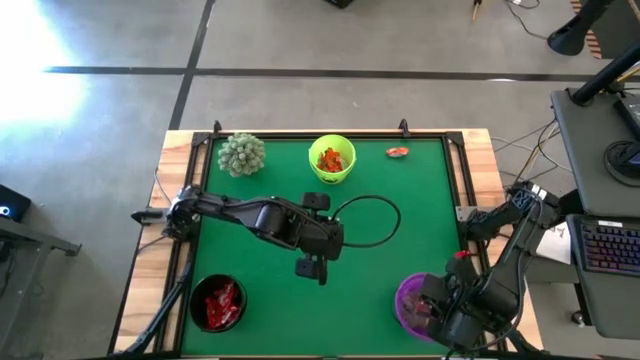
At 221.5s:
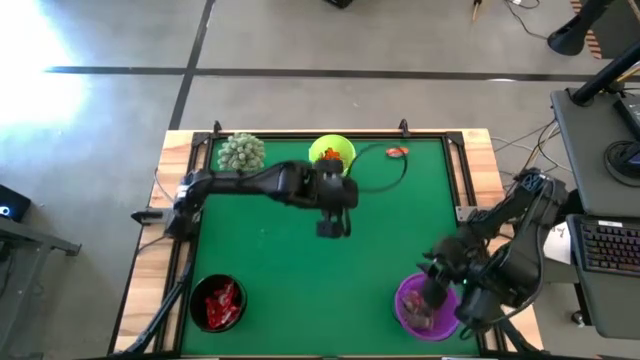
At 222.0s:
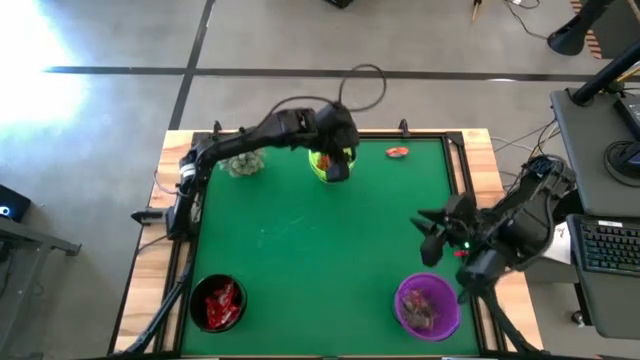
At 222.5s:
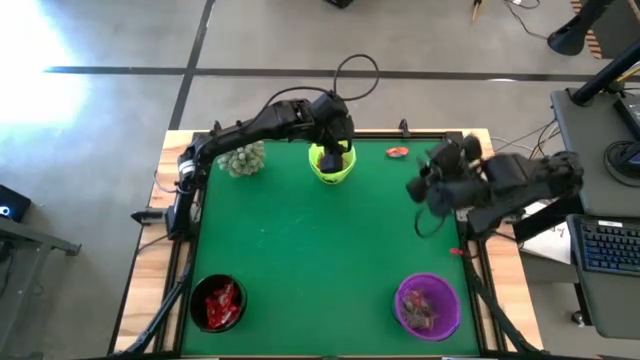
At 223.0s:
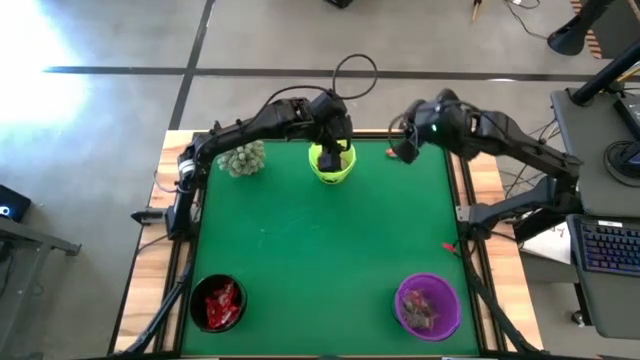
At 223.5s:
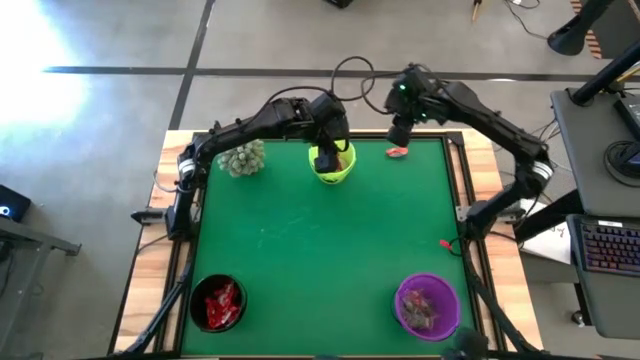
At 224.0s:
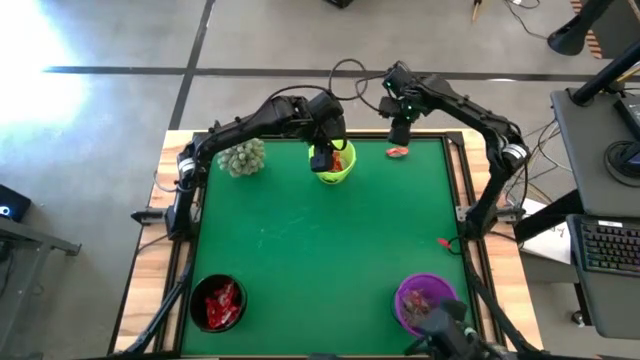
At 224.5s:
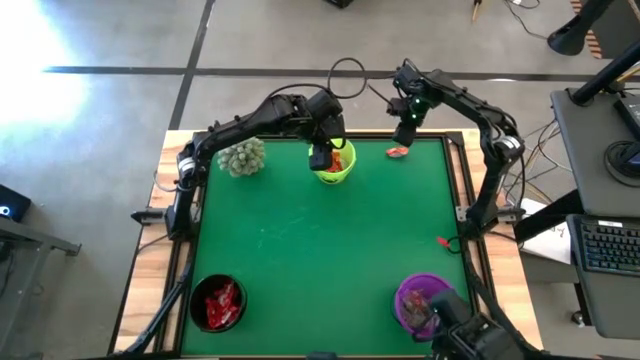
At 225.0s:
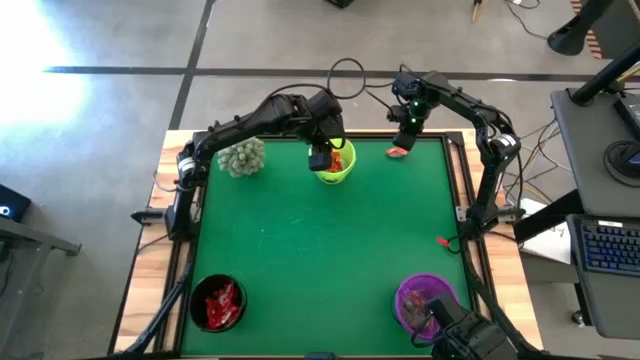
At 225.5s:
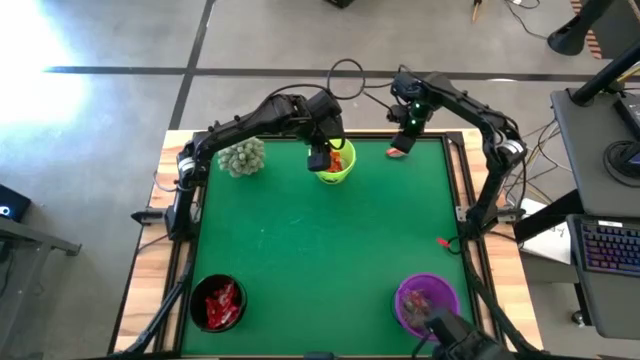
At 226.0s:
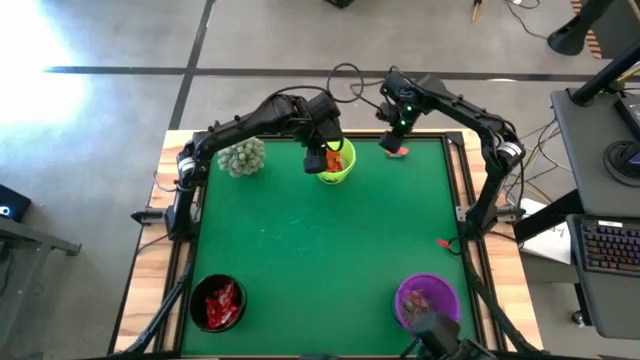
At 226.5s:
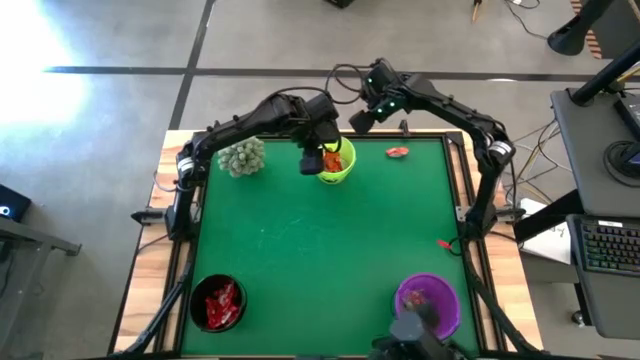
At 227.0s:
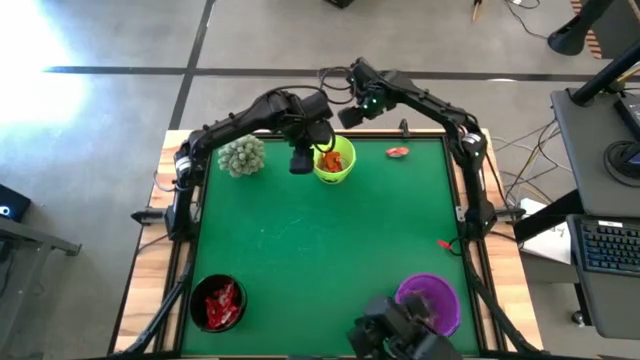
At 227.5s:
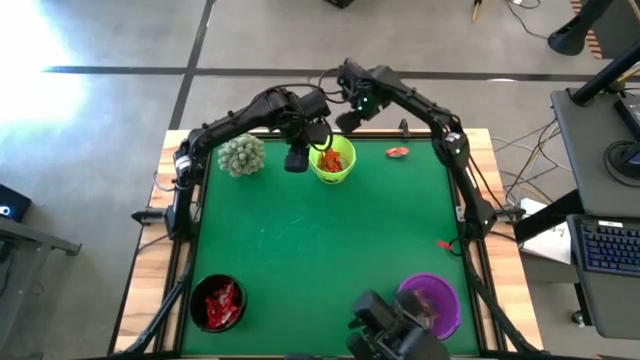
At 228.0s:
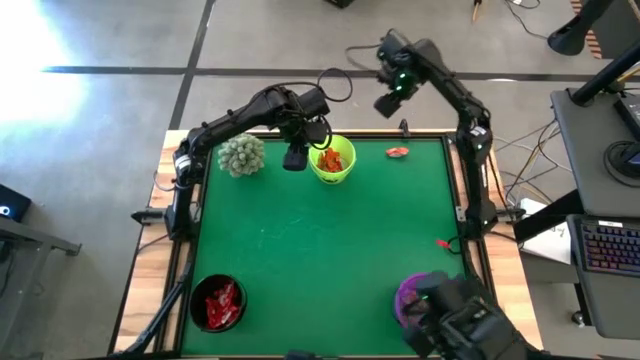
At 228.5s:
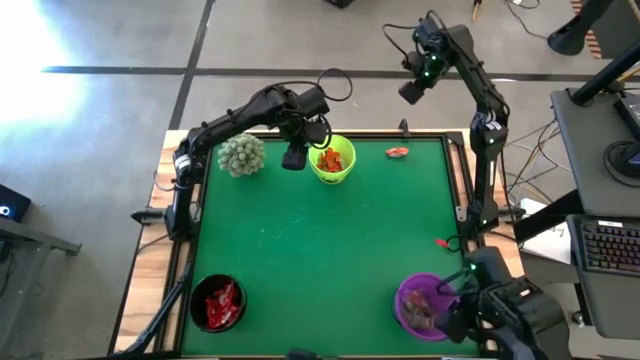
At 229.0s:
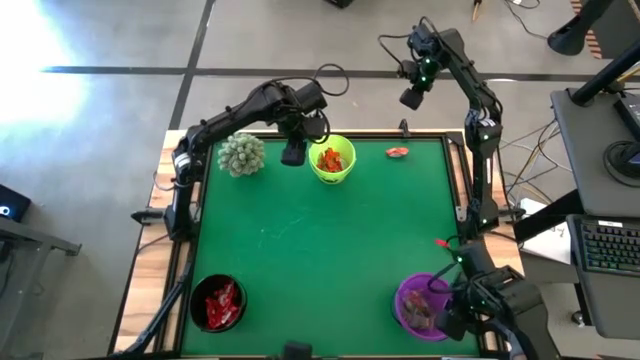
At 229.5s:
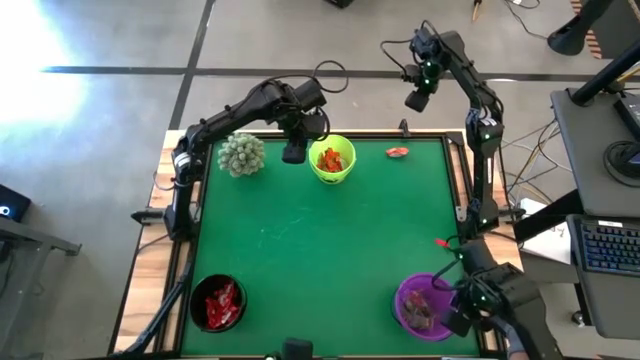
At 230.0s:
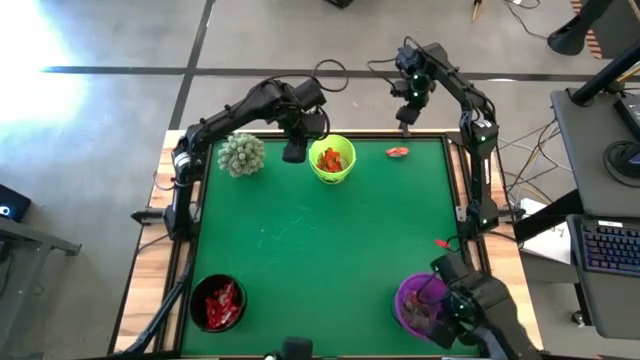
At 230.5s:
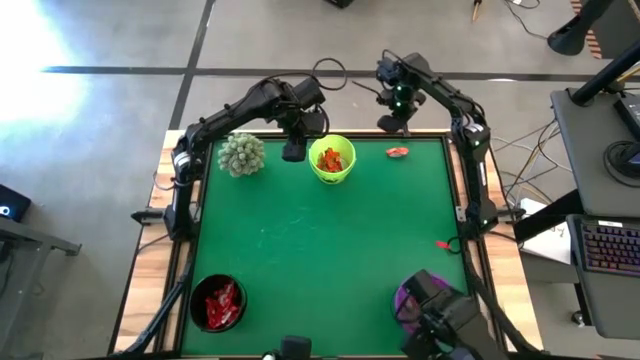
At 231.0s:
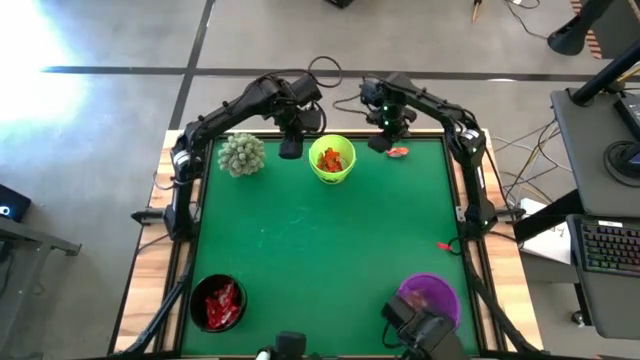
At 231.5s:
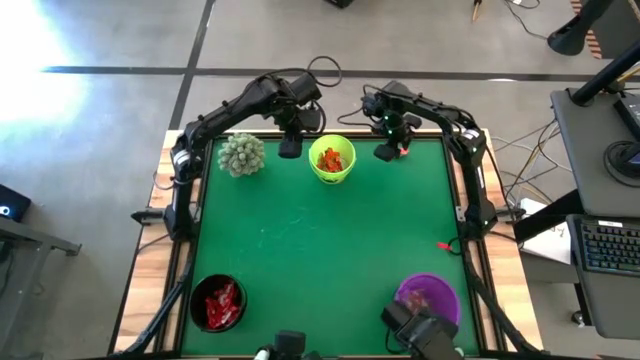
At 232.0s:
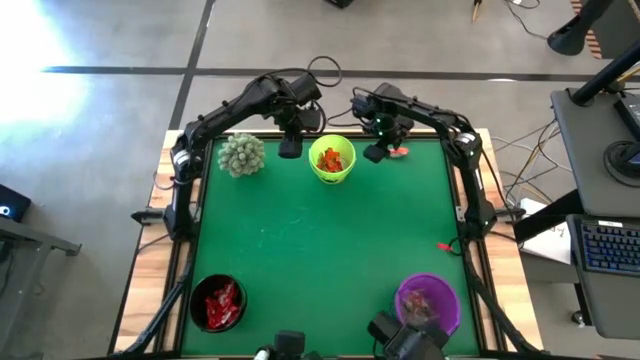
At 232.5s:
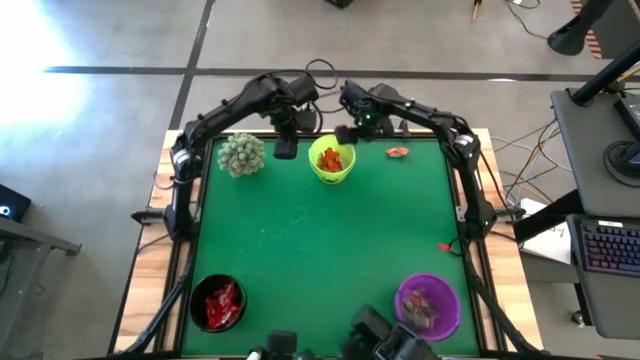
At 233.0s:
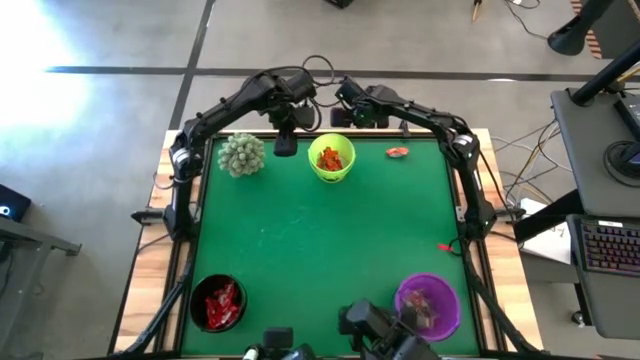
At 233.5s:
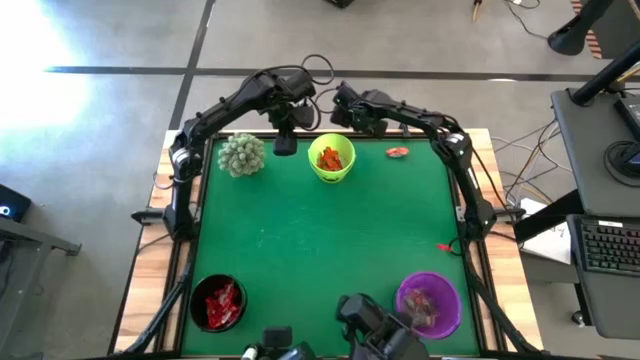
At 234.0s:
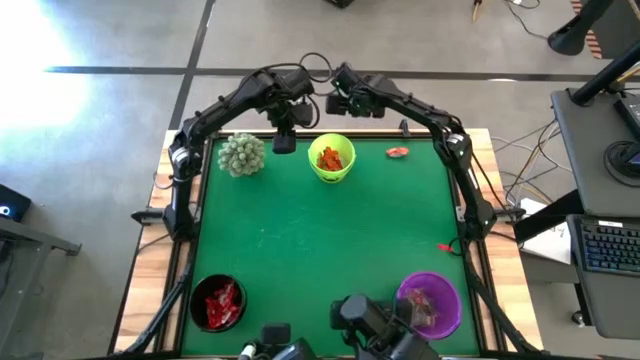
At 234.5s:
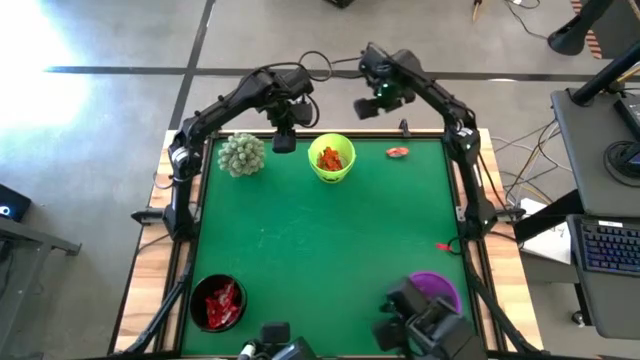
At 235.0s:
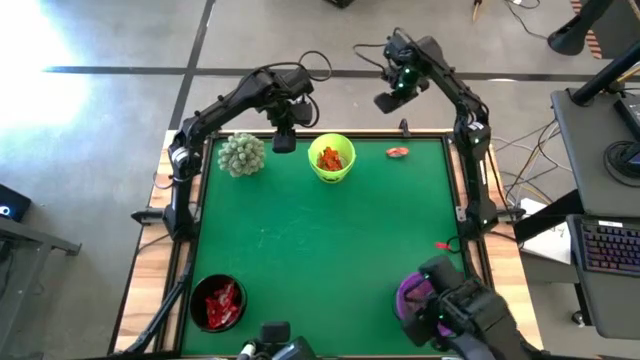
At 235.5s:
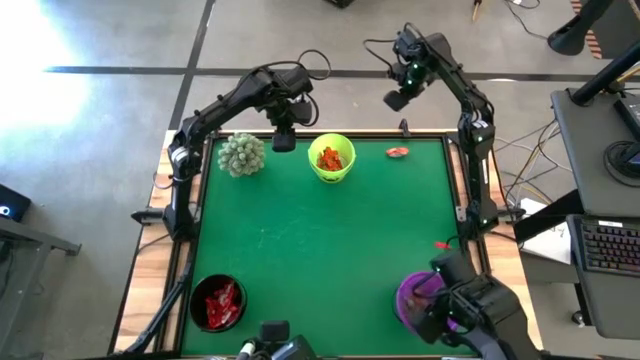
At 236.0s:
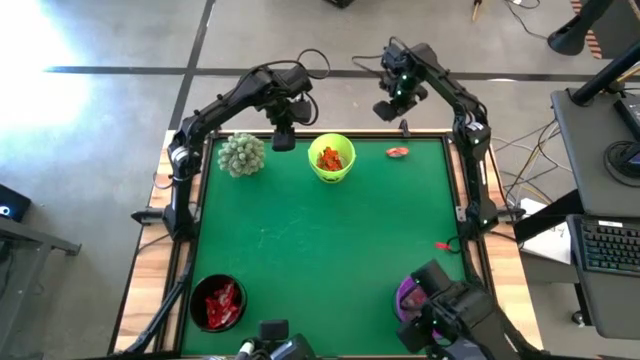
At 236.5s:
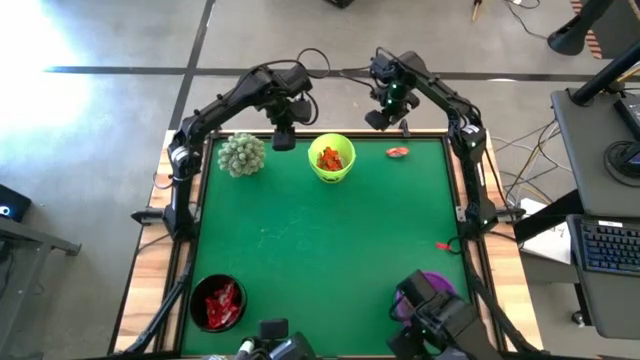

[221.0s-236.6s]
Task: Organize candy in baskets
Put the orange chocolate bar into the green bucket

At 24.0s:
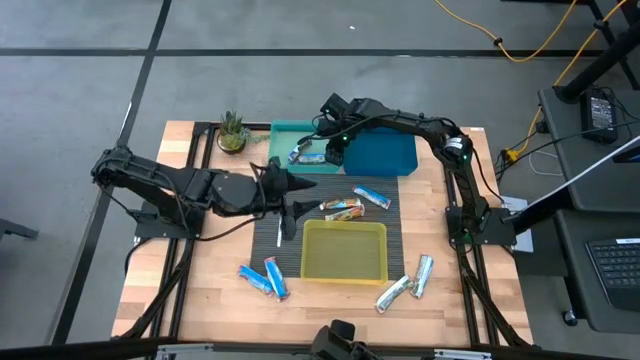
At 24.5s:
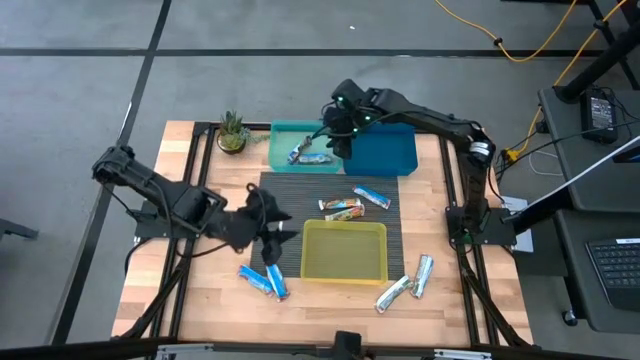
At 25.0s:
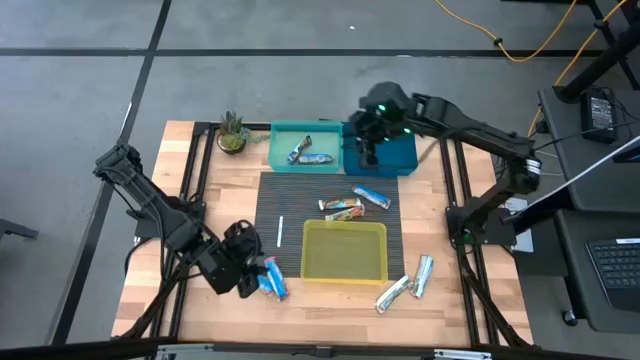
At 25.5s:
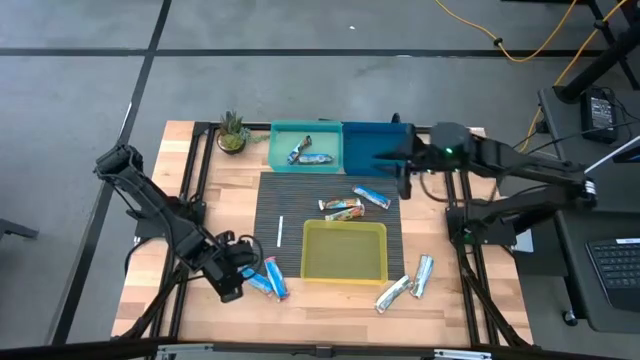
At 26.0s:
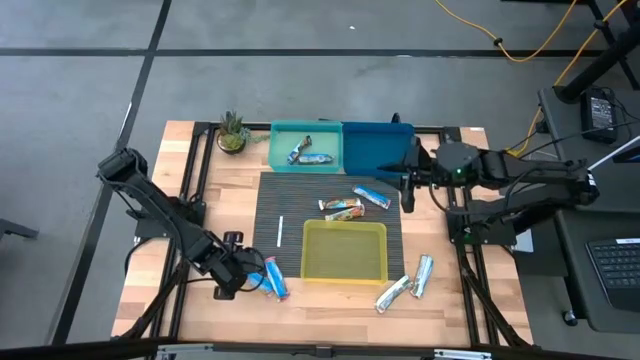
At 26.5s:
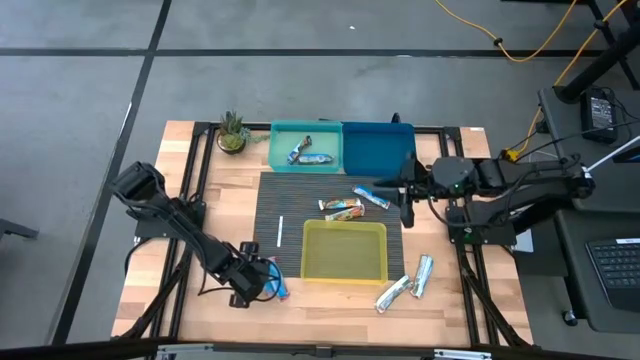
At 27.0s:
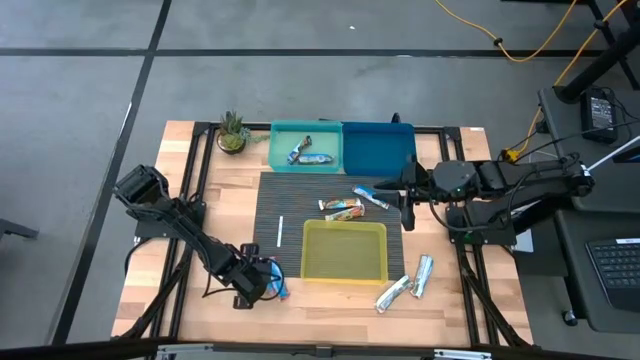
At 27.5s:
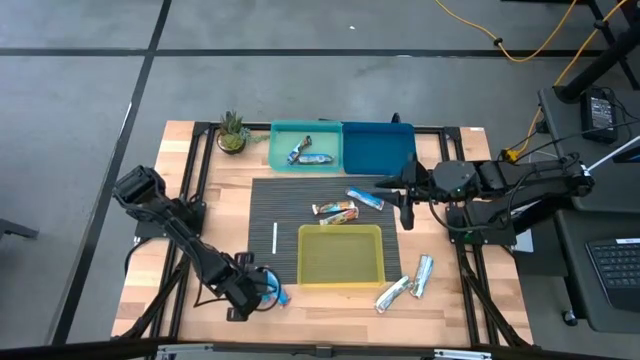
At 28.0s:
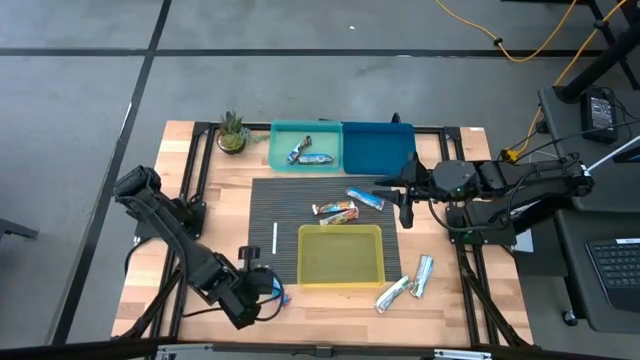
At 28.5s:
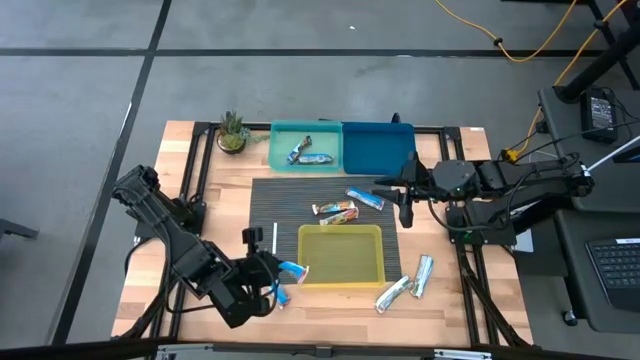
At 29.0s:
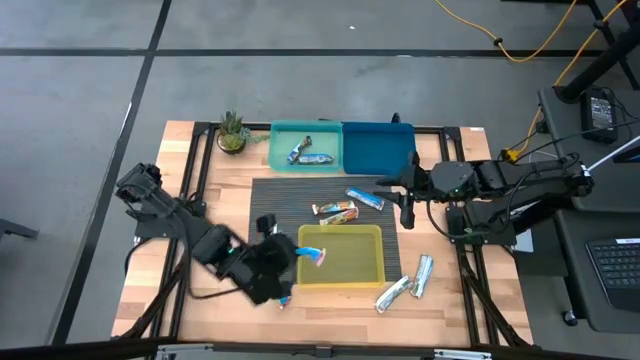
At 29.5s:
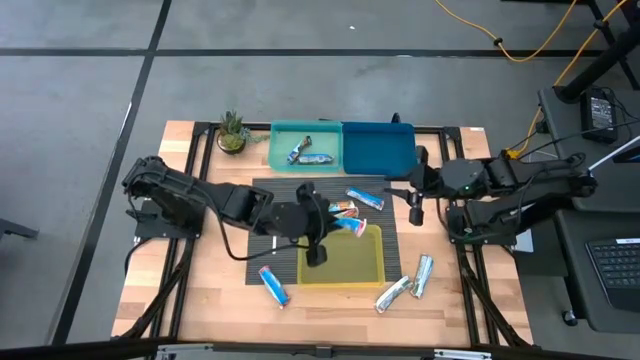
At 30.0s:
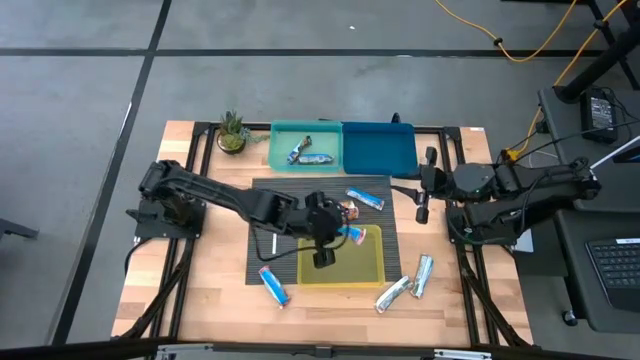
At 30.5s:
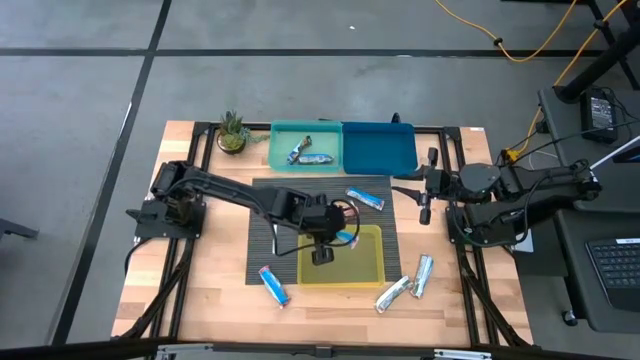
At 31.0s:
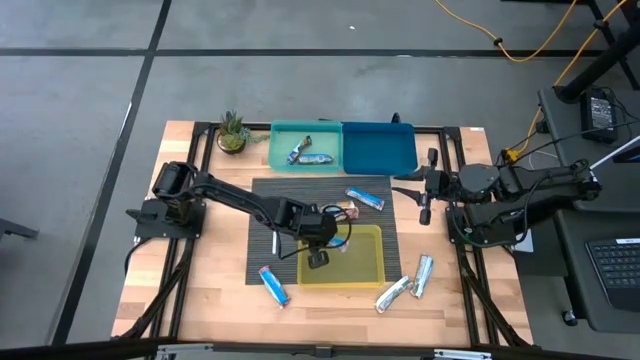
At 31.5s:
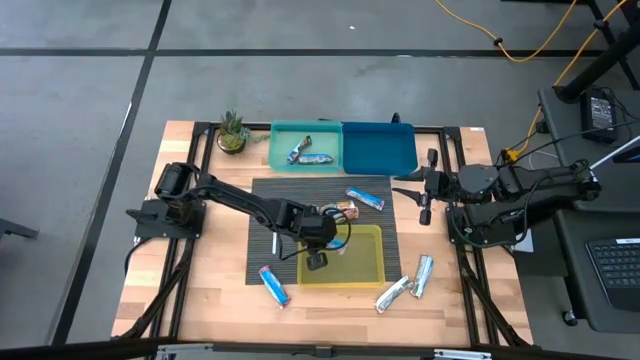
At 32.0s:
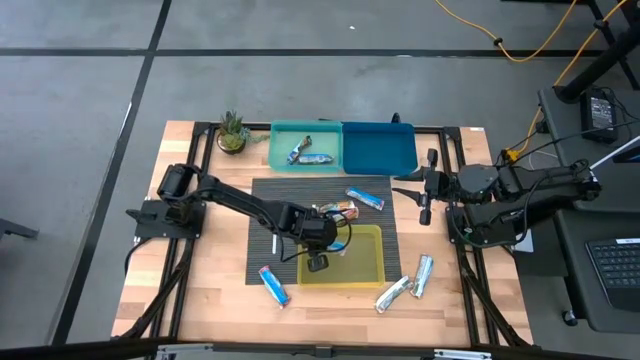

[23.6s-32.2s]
Task: Pick and place Granola Bars by type
Put the red granola bar into the yellow bin
